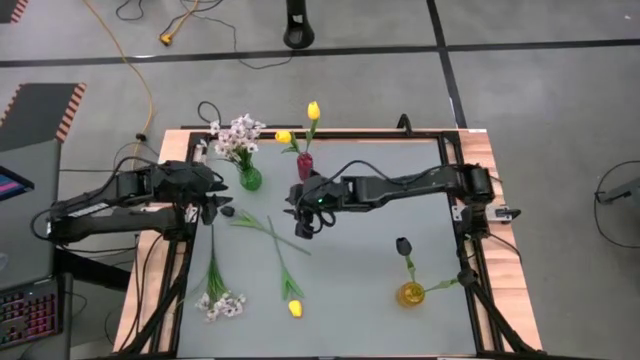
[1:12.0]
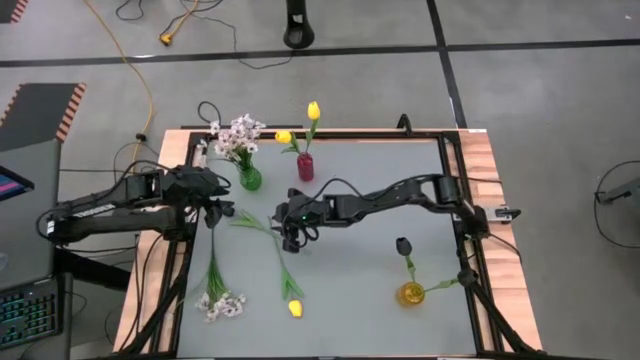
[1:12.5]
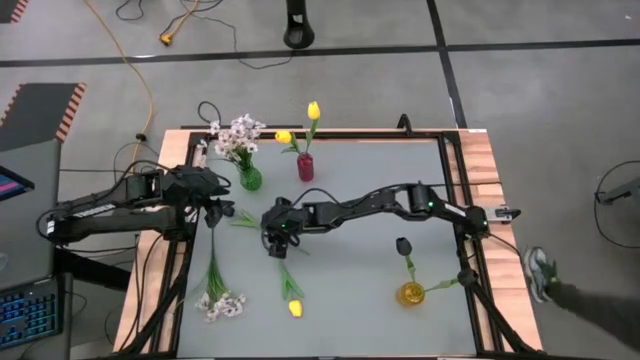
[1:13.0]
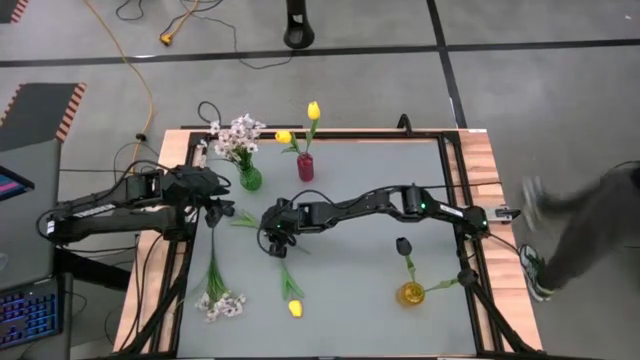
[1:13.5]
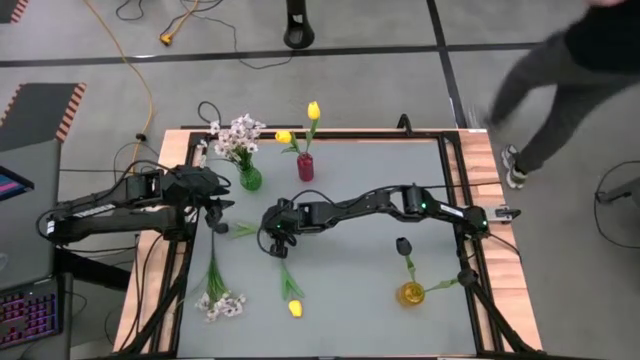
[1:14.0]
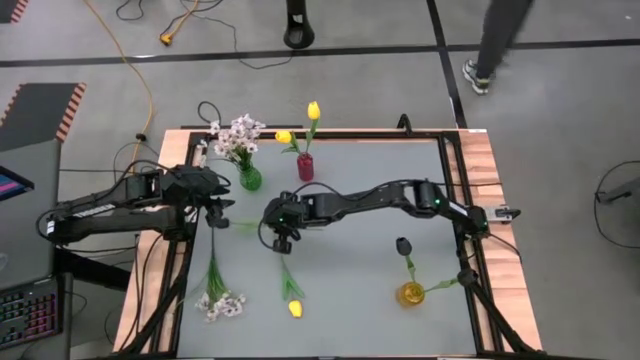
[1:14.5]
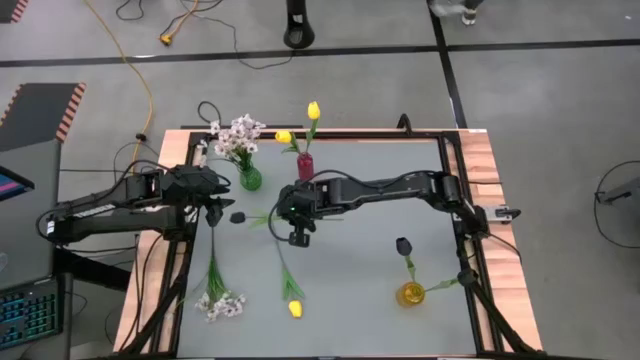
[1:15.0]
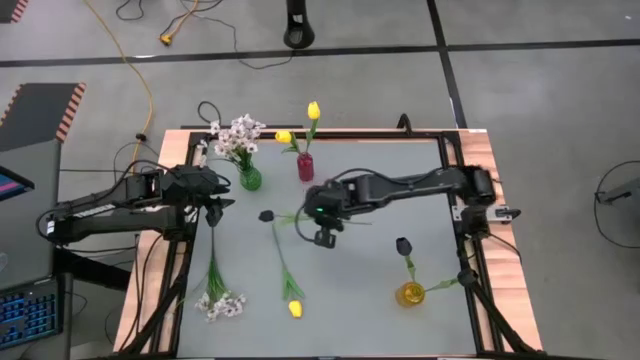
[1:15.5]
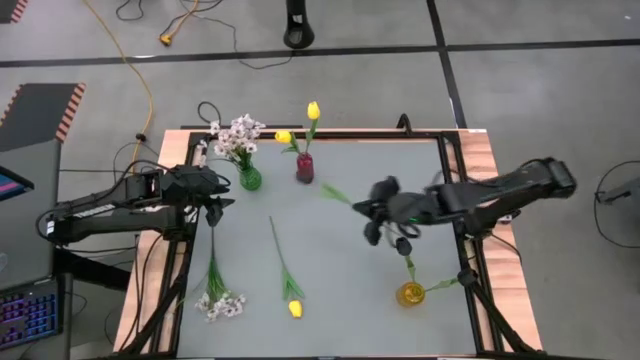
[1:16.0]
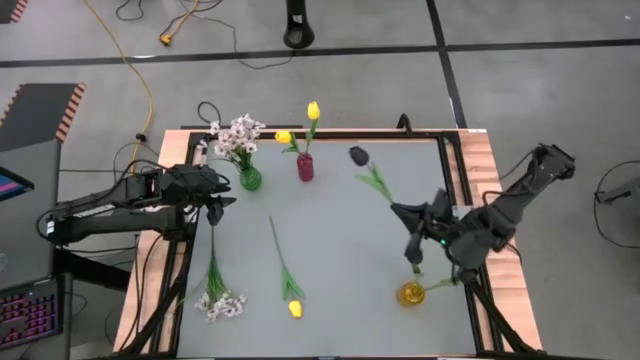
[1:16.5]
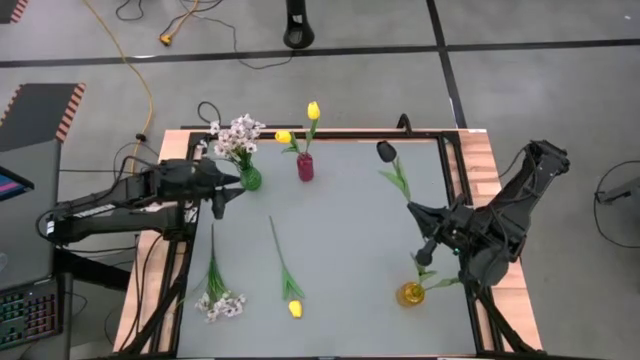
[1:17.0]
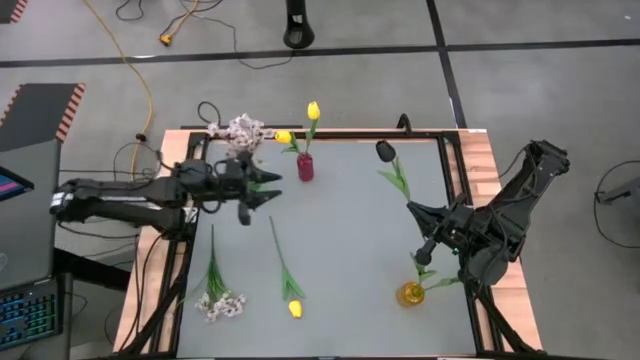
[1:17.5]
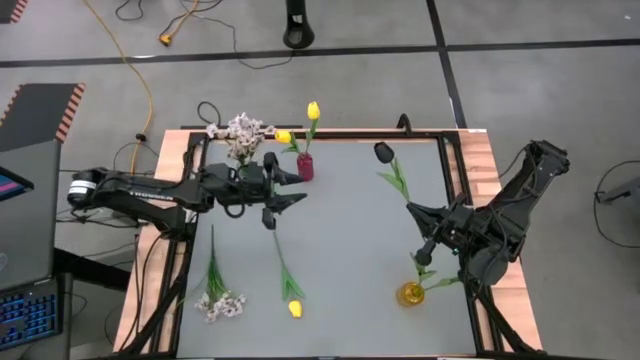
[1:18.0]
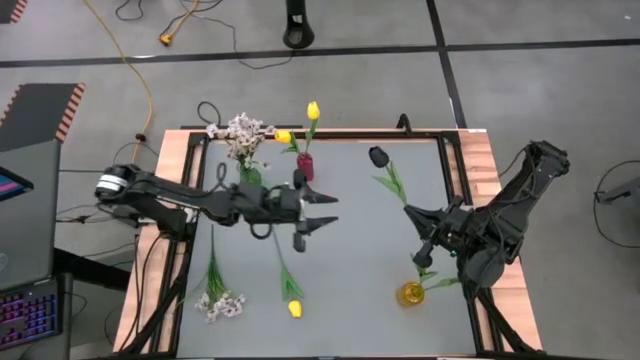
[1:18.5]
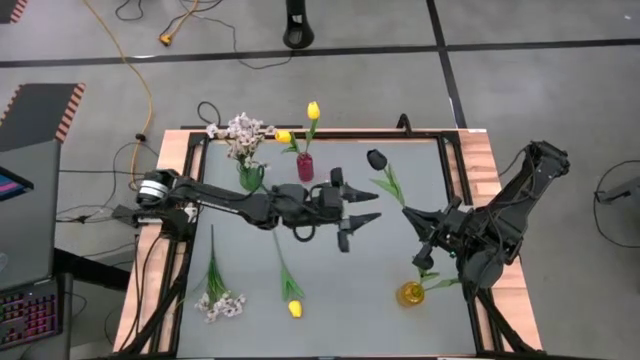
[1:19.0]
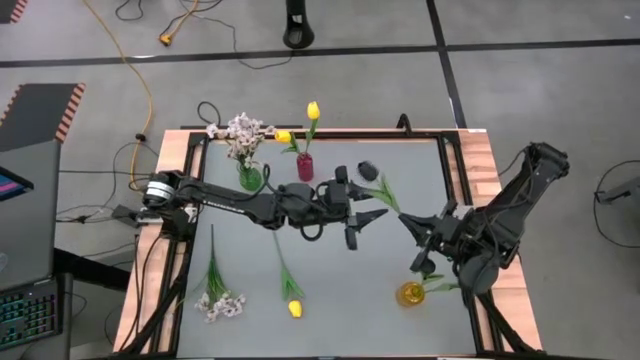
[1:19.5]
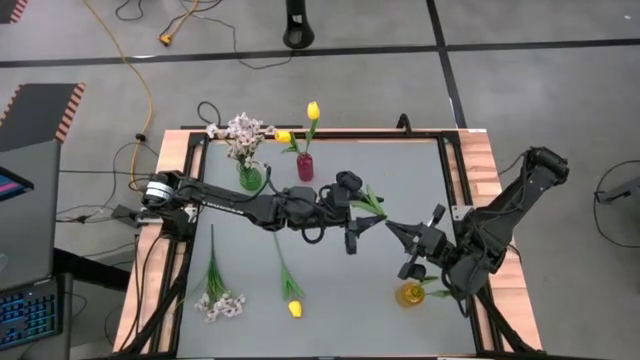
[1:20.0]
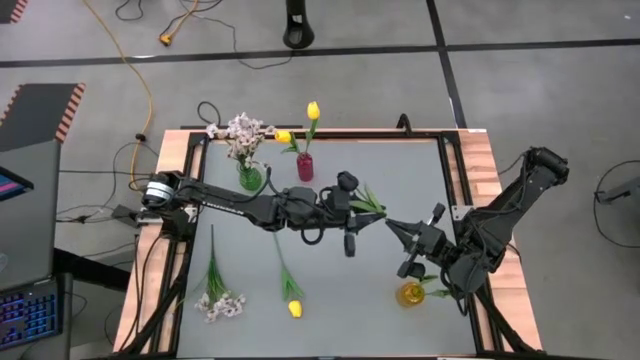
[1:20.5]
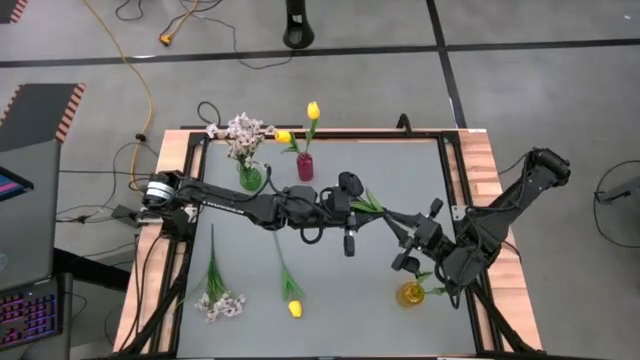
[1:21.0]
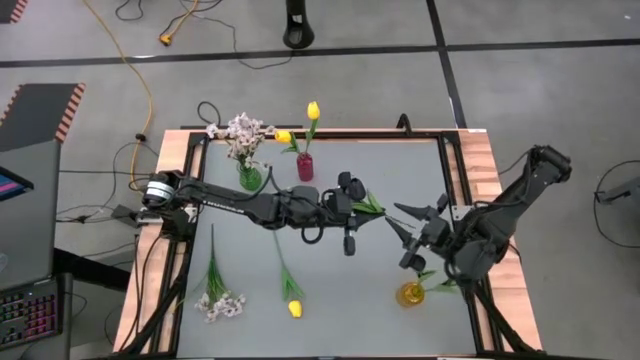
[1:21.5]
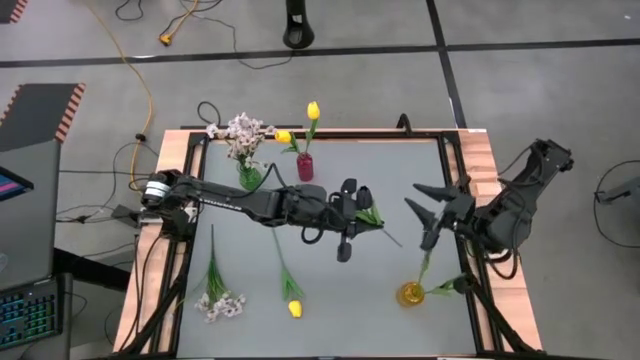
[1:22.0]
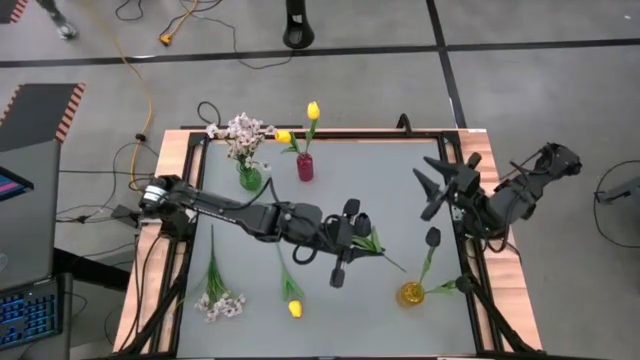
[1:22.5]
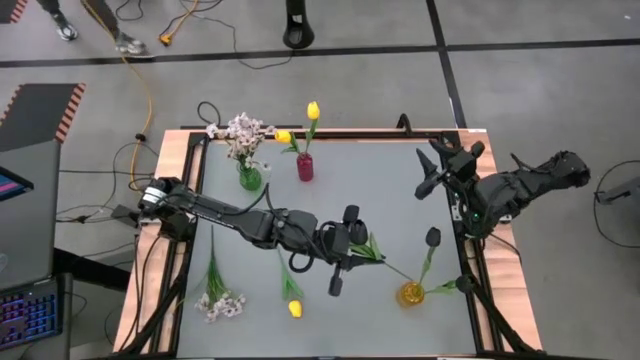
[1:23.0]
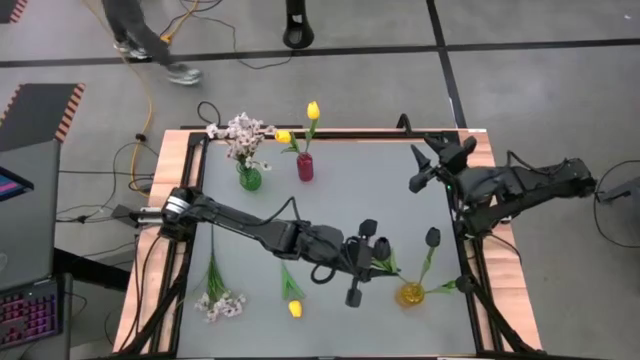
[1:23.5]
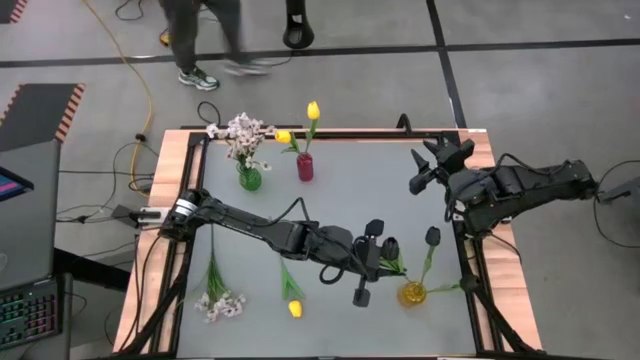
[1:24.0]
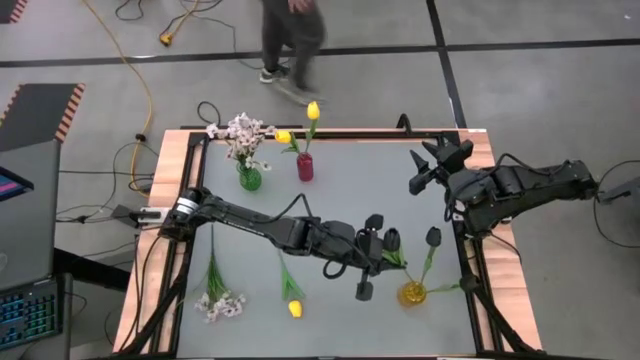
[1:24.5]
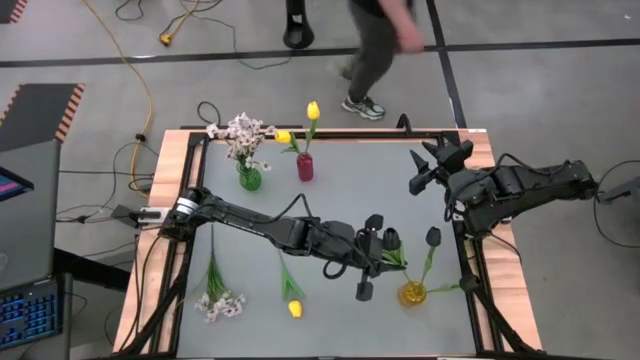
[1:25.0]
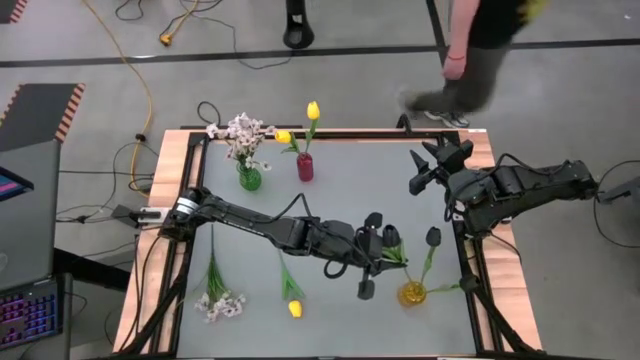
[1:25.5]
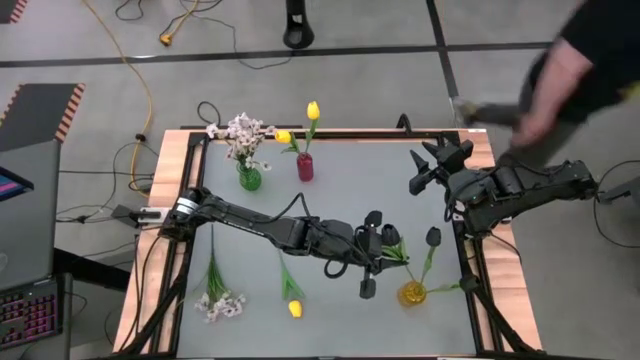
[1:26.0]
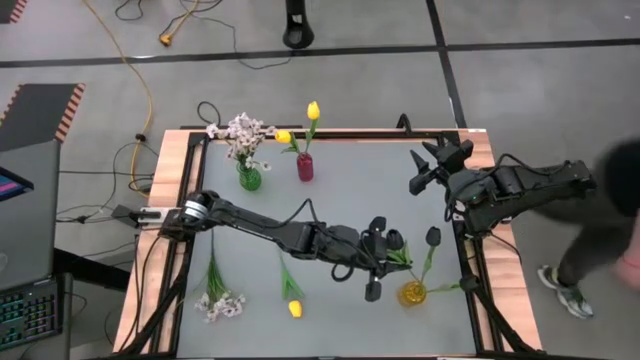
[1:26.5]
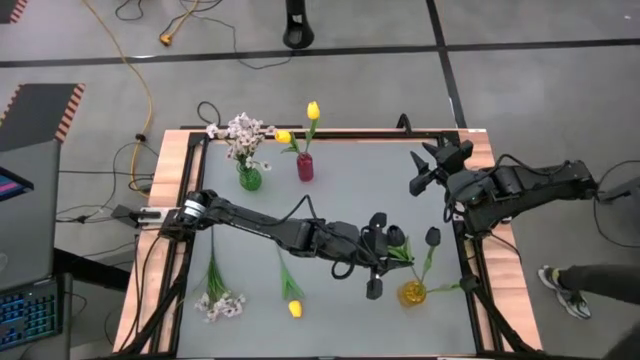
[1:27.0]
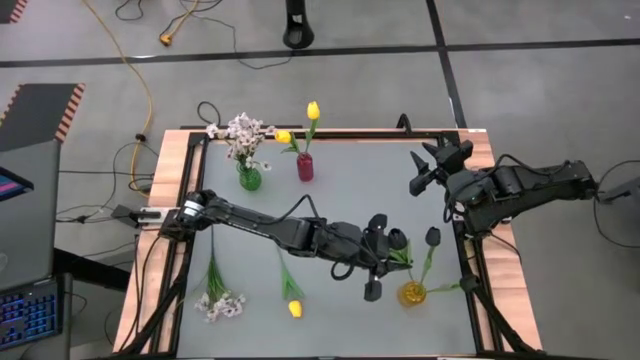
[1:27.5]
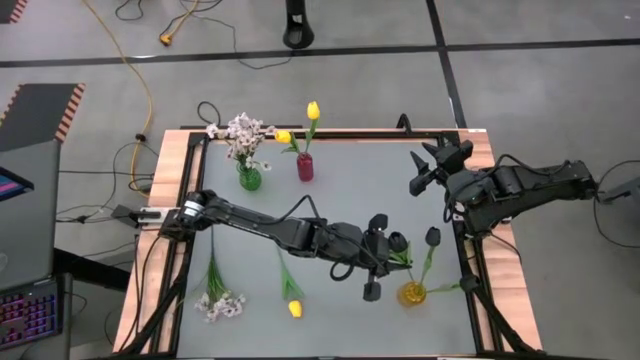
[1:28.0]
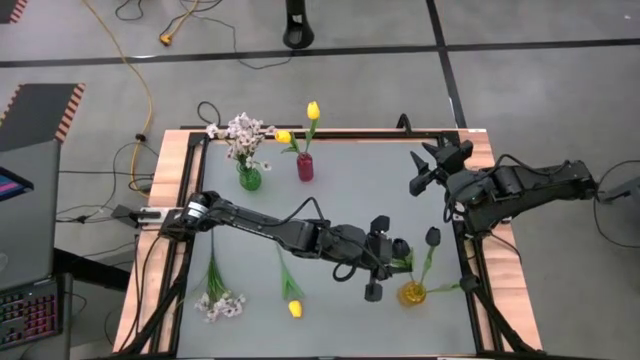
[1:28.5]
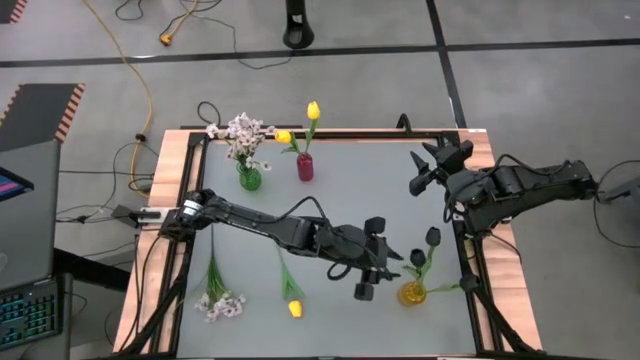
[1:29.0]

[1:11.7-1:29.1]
Task: Sort flowers into vase by color
Put the black tulip into the yellow vase
